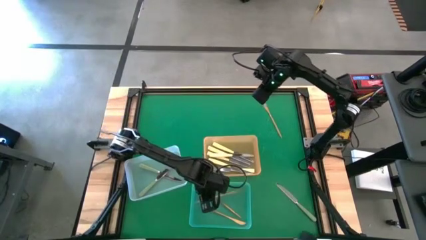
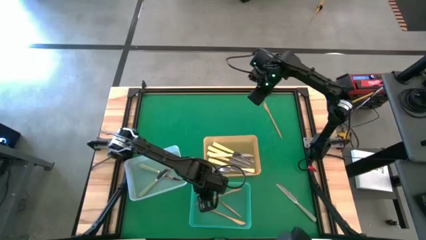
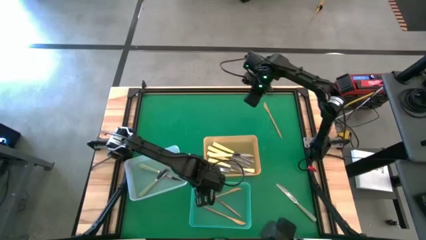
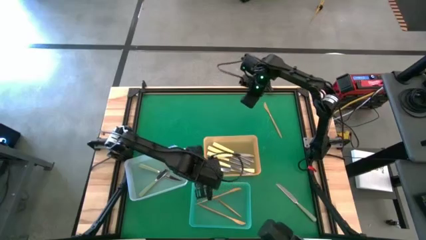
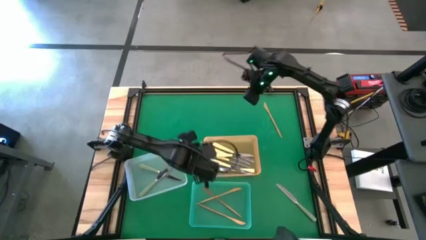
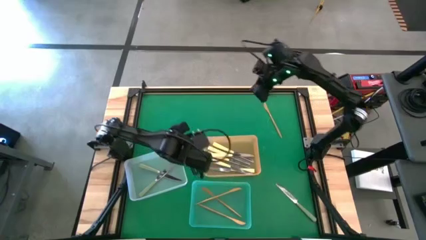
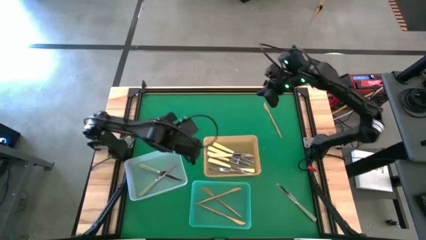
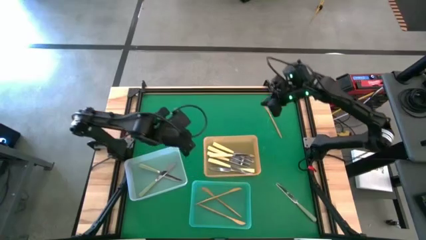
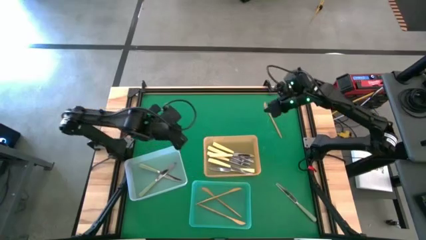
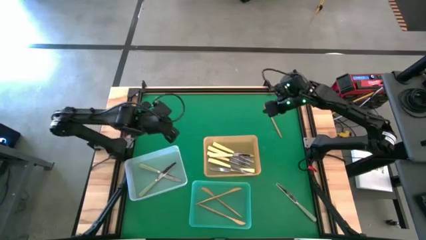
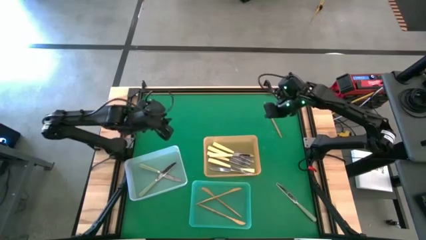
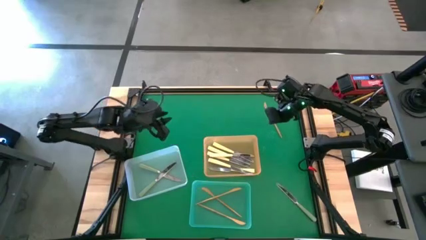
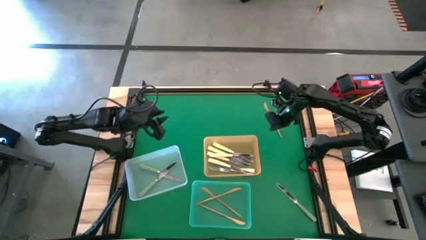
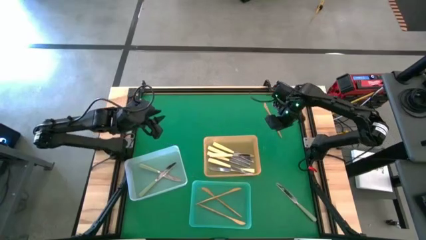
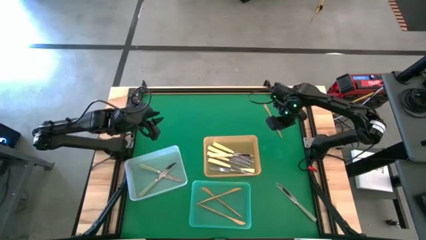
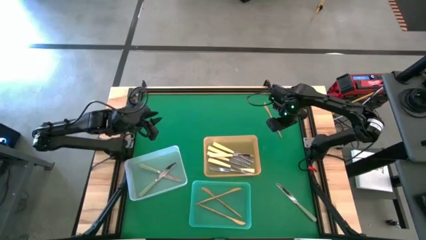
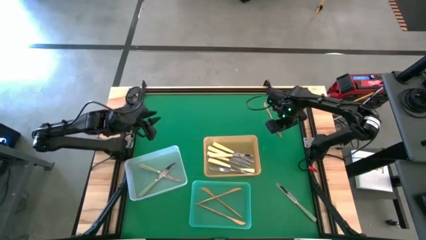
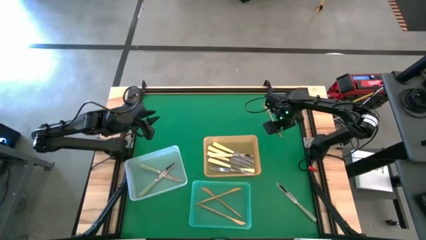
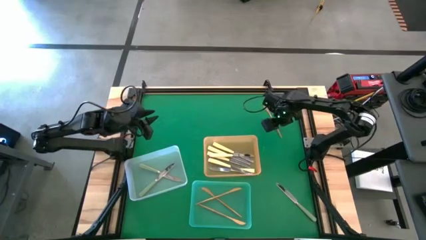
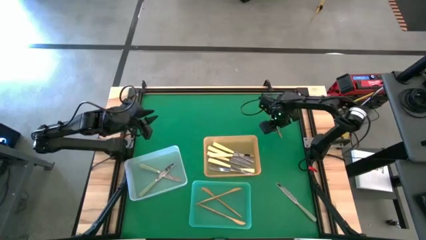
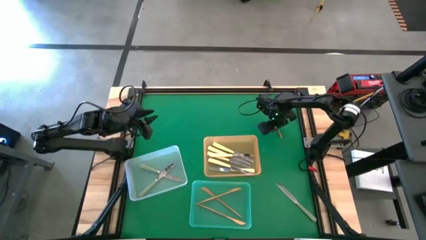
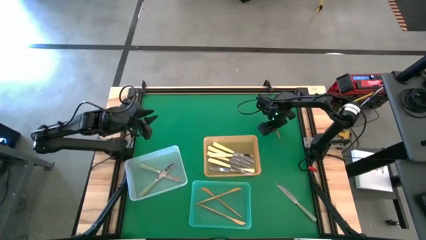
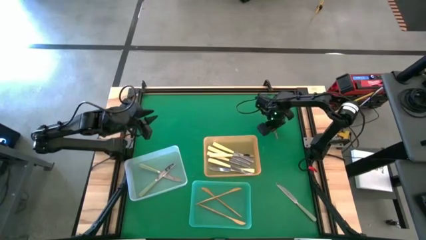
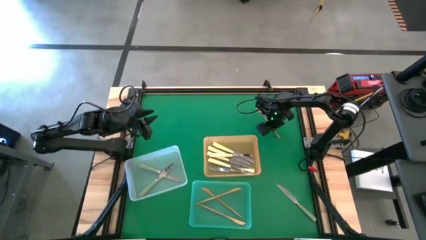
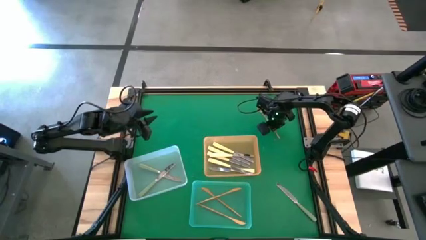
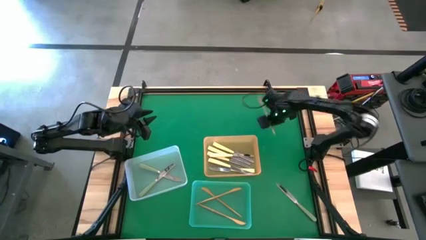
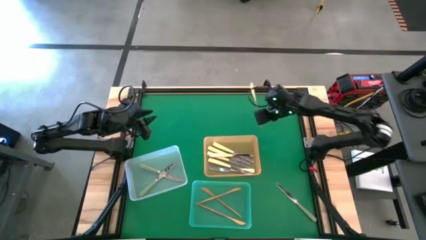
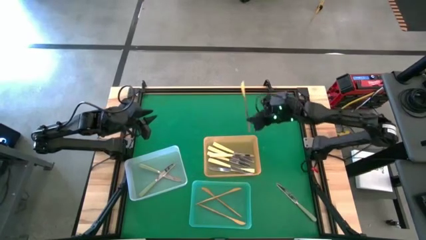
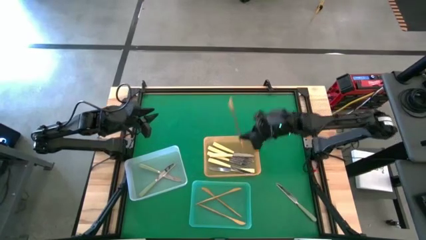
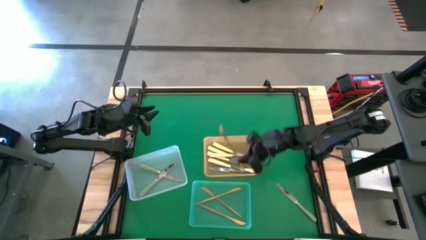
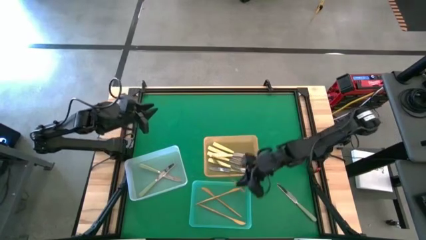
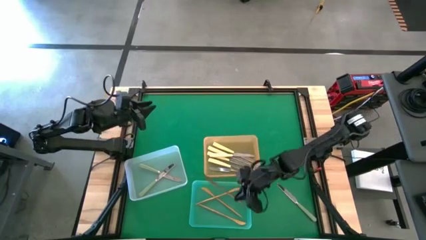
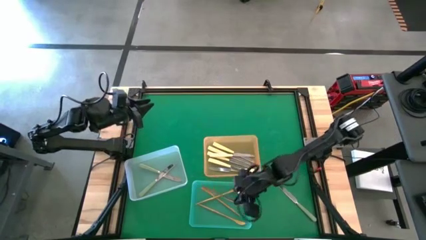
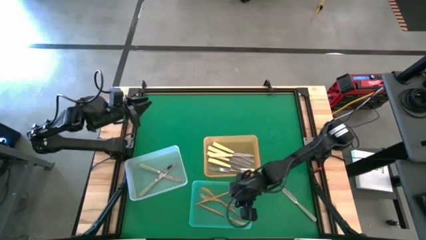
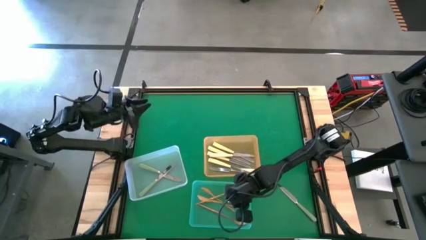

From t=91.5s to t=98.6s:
Task: Sort silverware by color (type)
Put the gold table knife into the blue bin

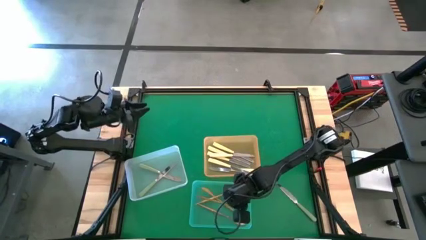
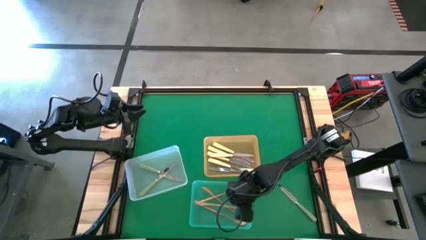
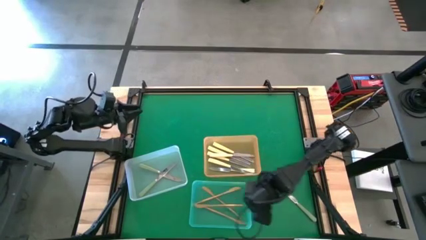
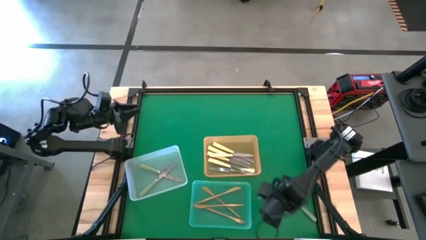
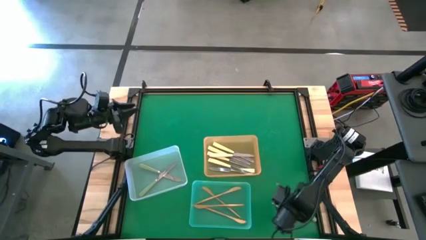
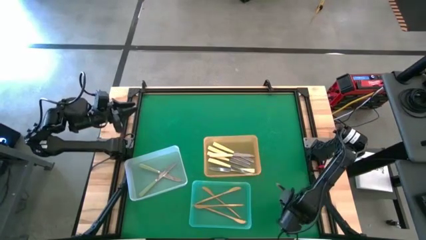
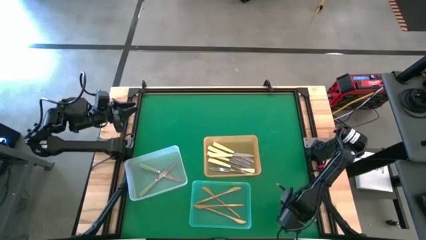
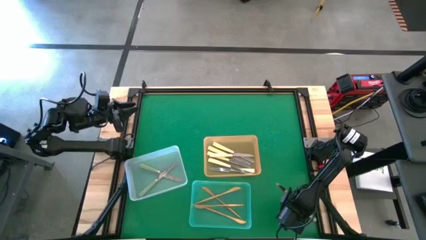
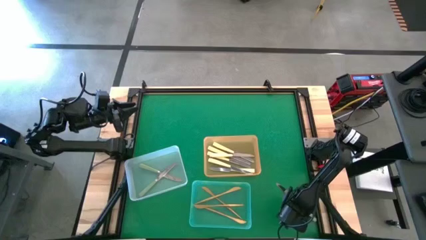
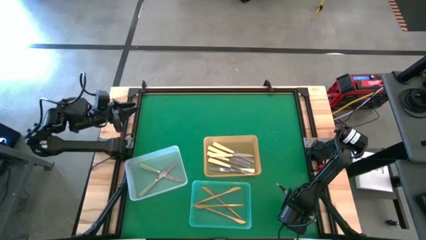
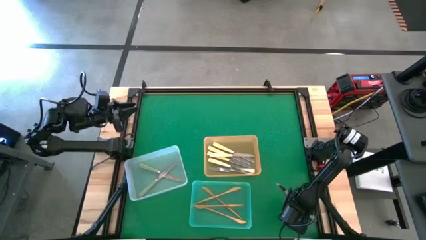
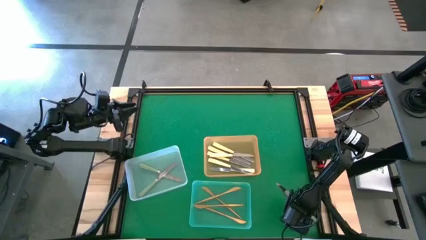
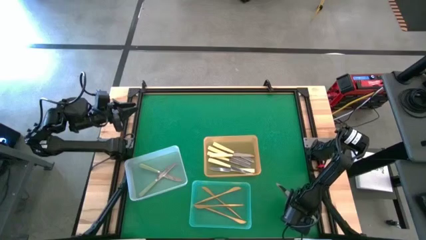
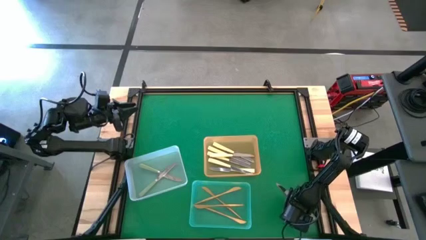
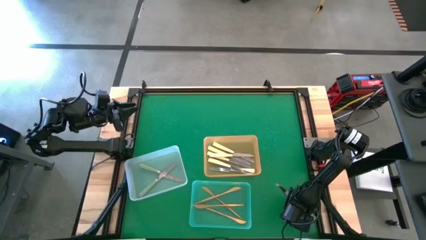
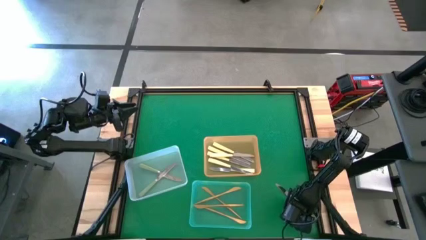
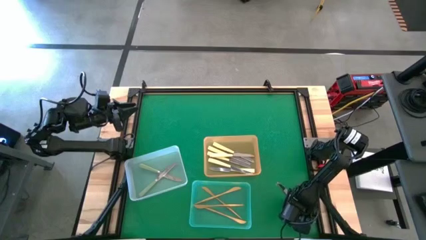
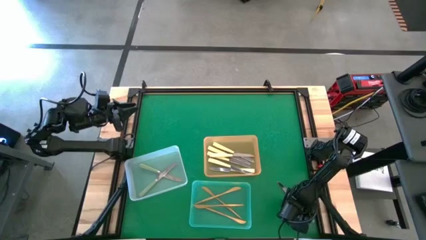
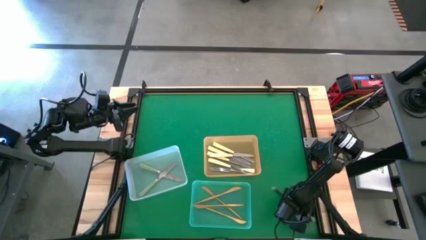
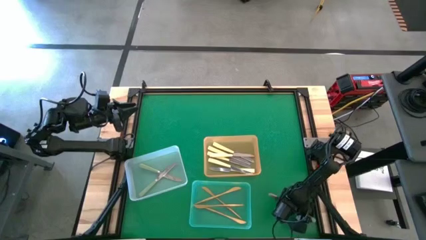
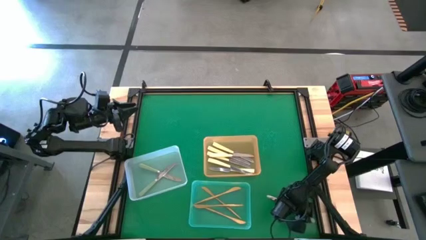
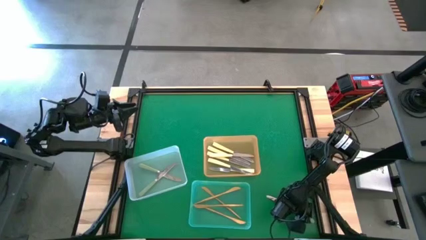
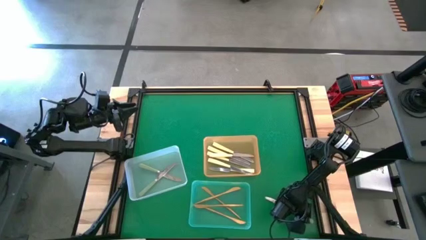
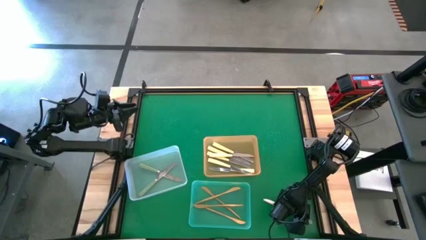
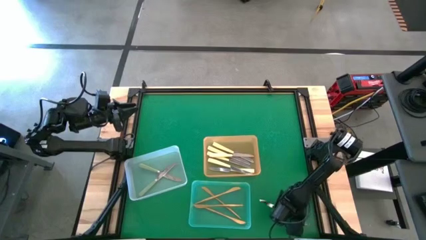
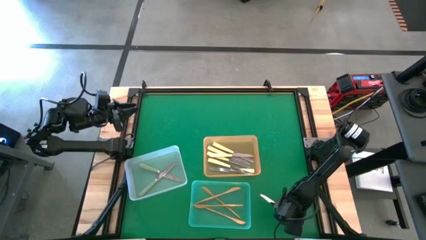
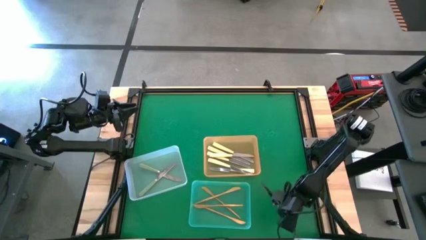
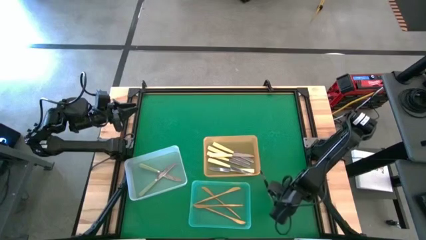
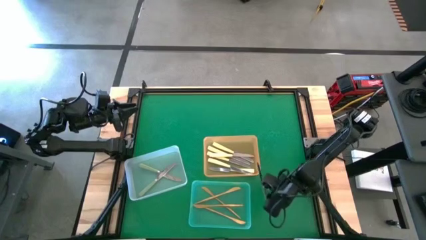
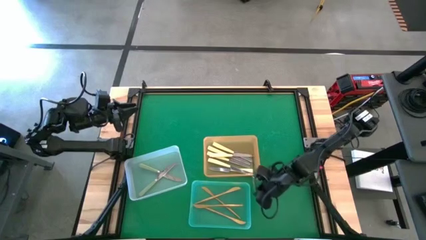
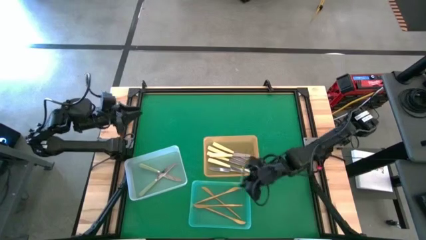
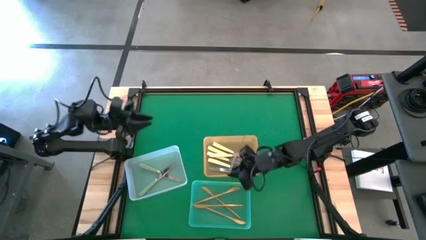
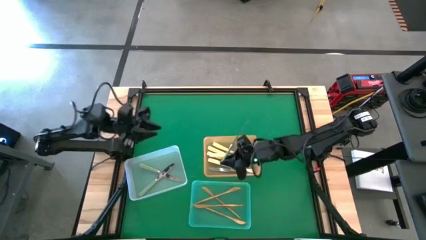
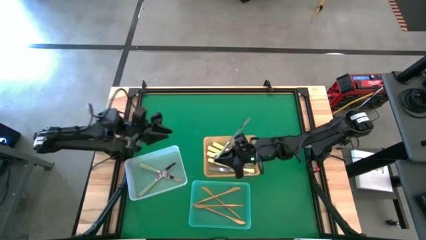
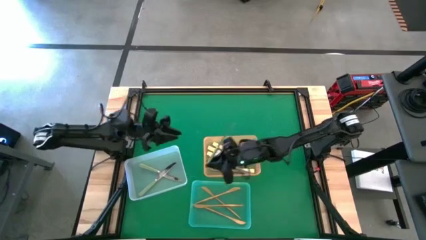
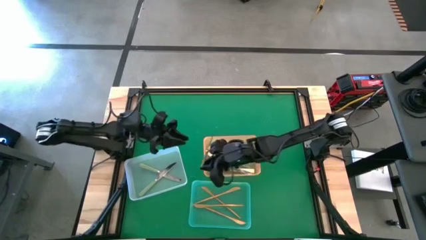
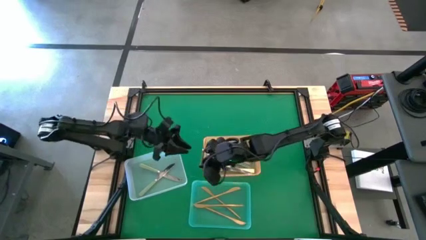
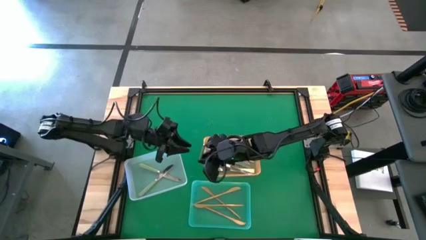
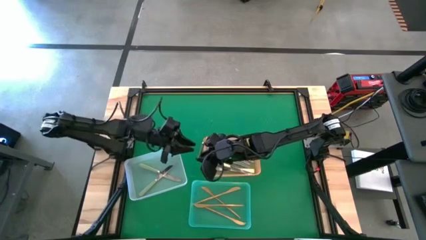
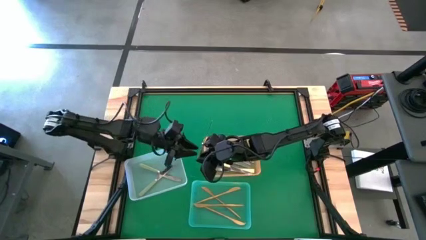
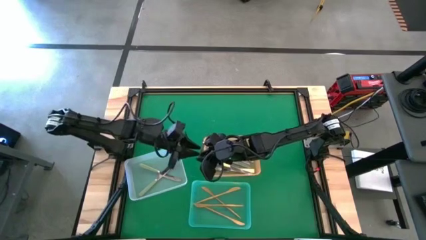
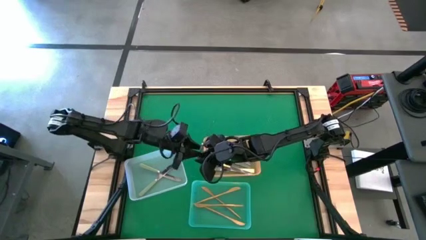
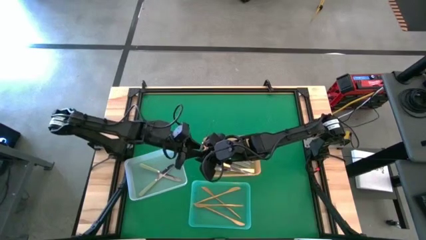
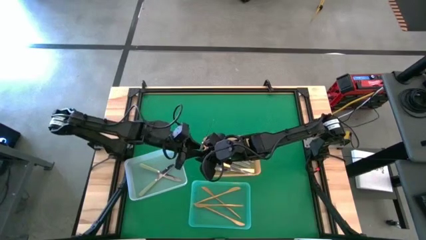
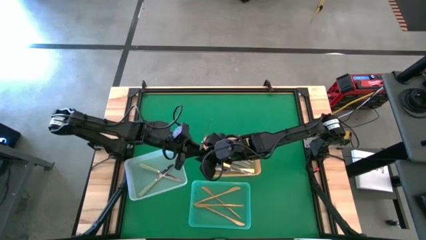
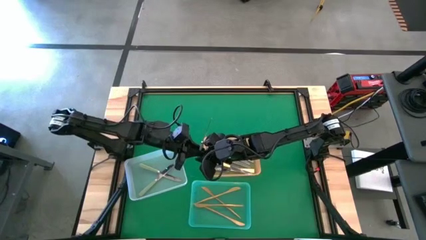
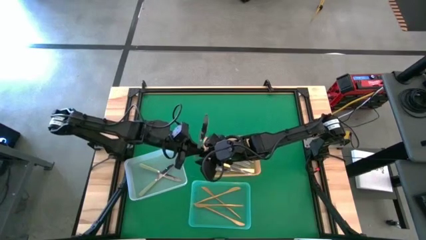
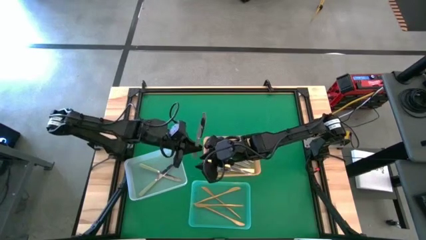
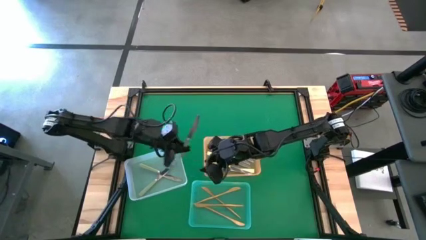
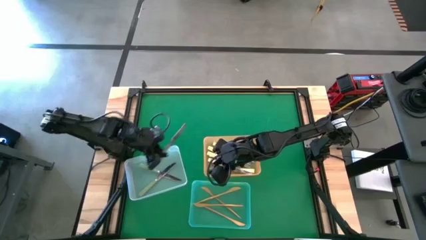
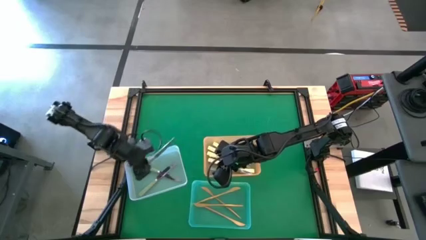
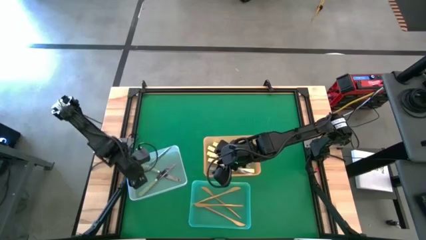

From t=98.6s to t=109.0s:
Put the green table knife into the white bin
